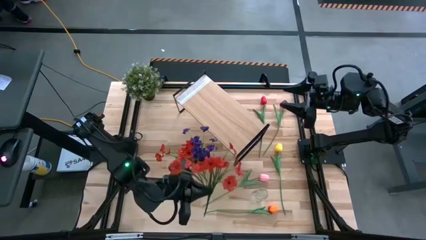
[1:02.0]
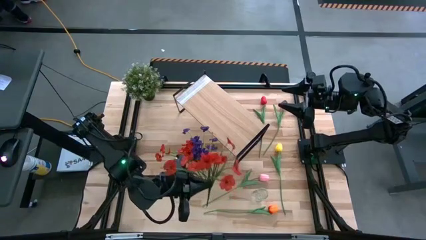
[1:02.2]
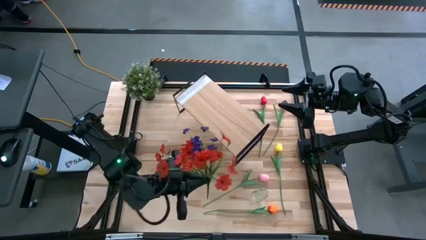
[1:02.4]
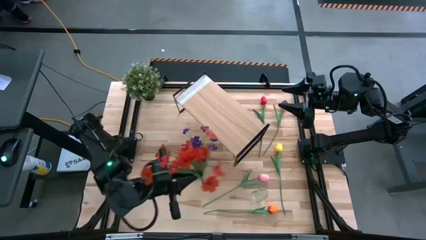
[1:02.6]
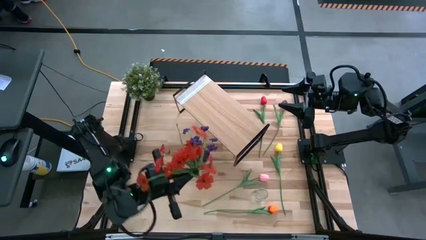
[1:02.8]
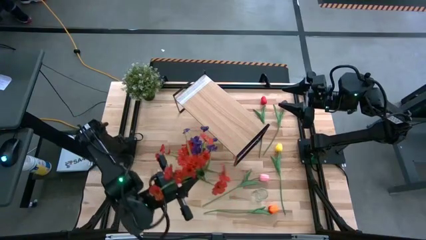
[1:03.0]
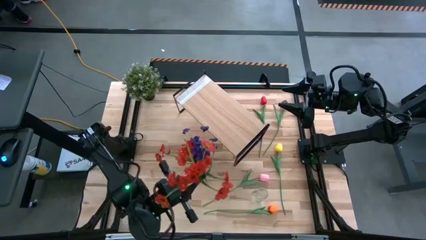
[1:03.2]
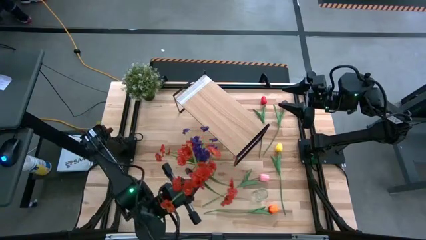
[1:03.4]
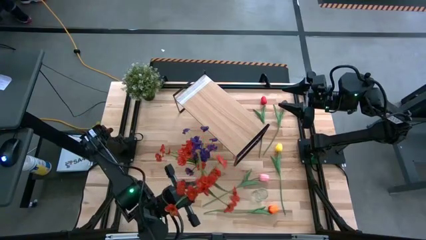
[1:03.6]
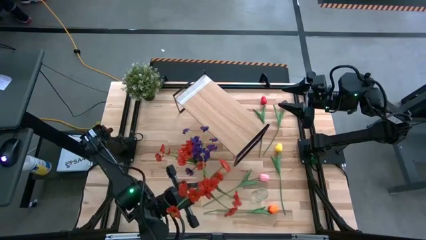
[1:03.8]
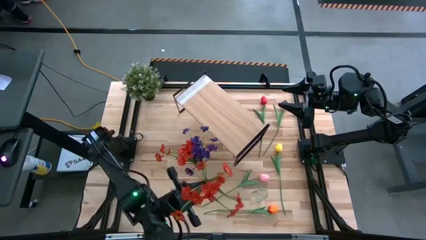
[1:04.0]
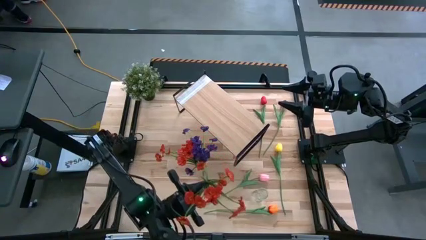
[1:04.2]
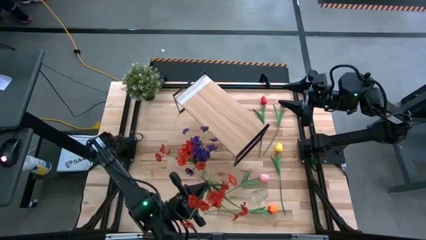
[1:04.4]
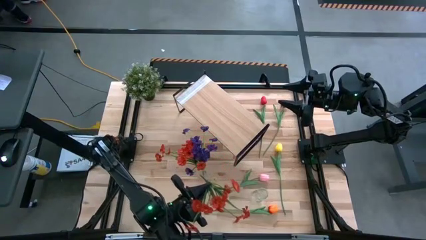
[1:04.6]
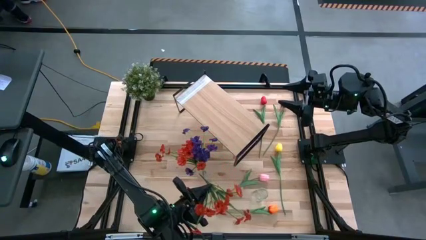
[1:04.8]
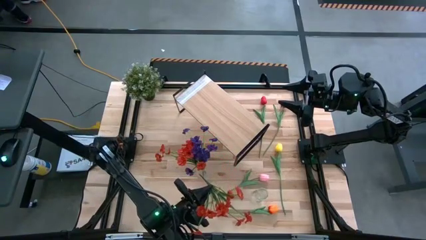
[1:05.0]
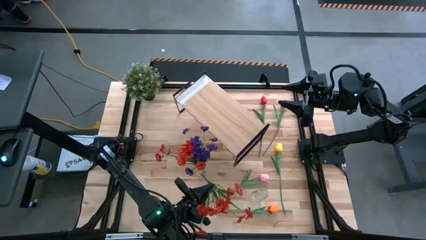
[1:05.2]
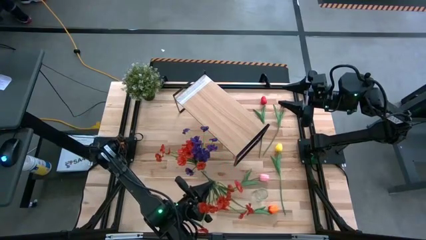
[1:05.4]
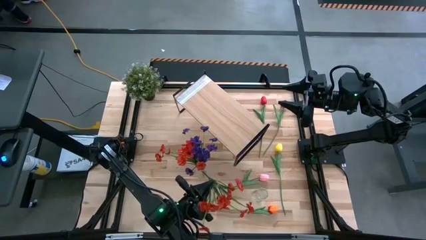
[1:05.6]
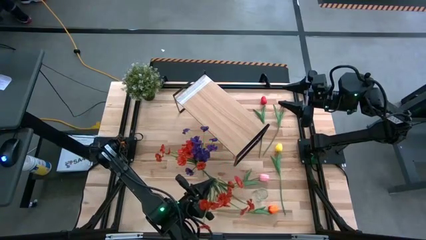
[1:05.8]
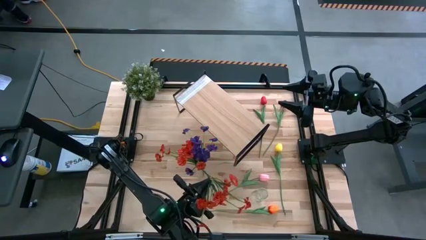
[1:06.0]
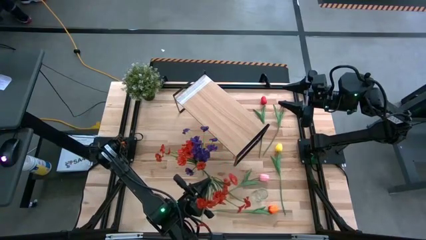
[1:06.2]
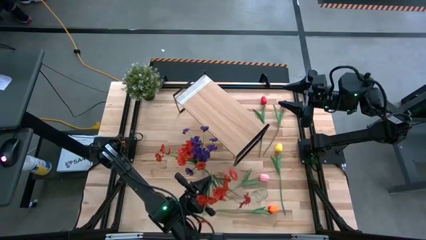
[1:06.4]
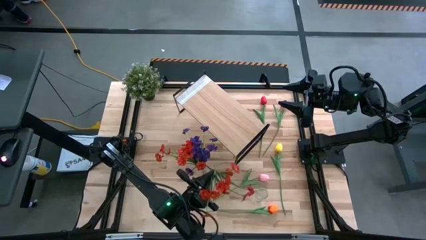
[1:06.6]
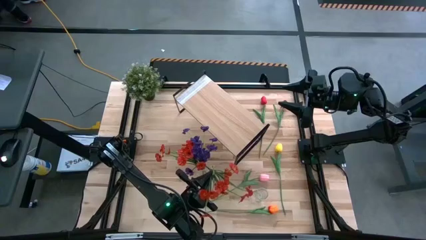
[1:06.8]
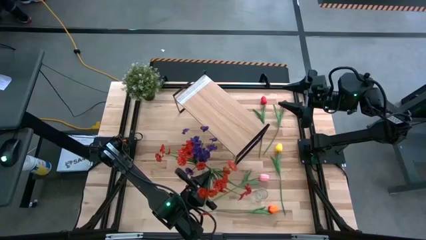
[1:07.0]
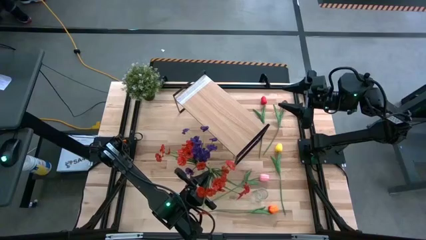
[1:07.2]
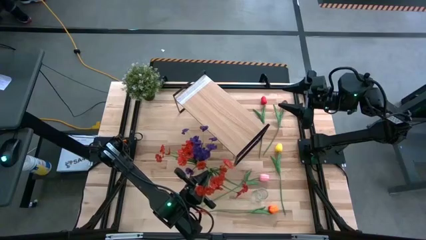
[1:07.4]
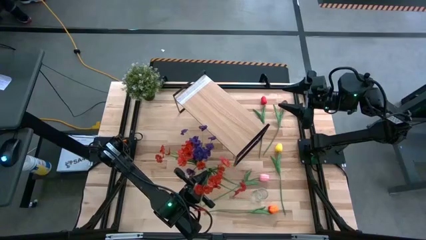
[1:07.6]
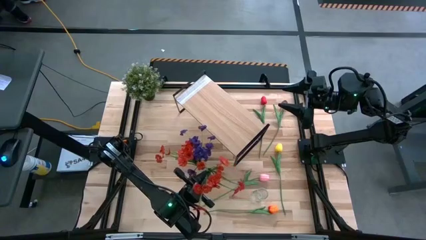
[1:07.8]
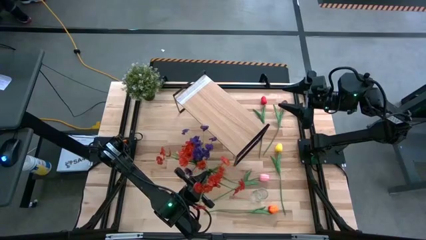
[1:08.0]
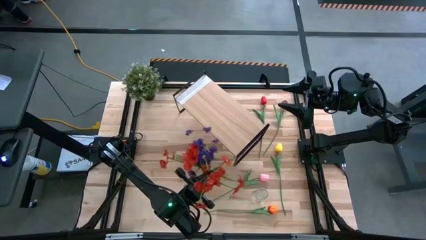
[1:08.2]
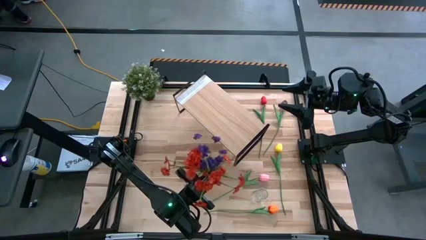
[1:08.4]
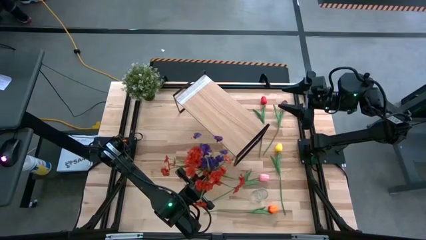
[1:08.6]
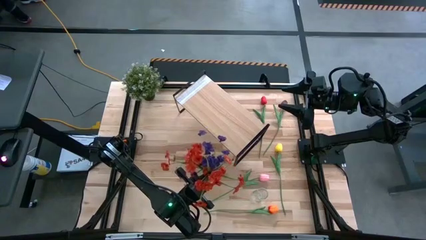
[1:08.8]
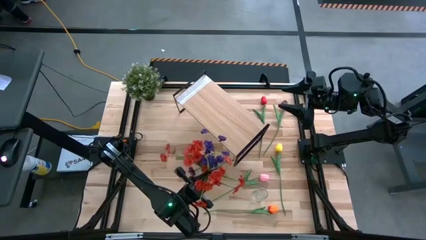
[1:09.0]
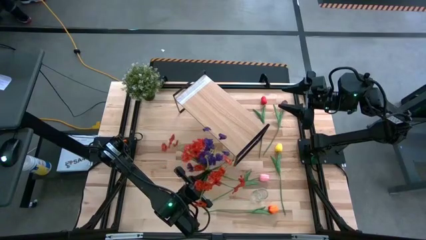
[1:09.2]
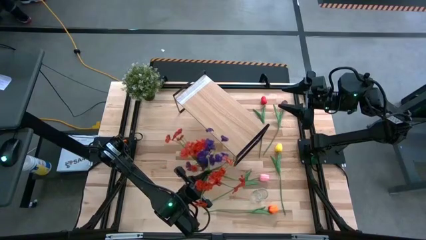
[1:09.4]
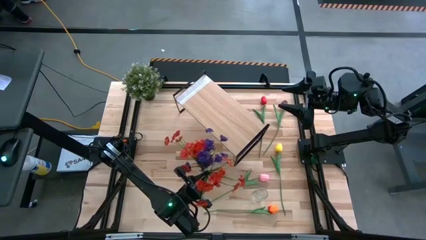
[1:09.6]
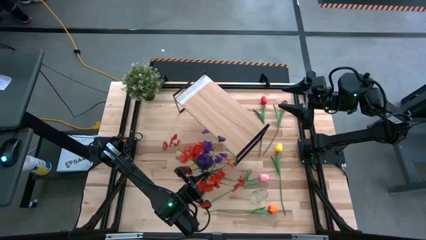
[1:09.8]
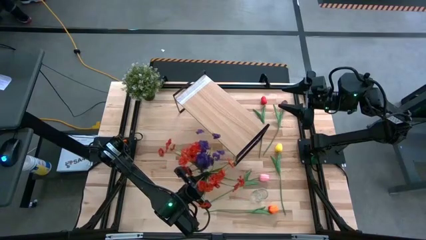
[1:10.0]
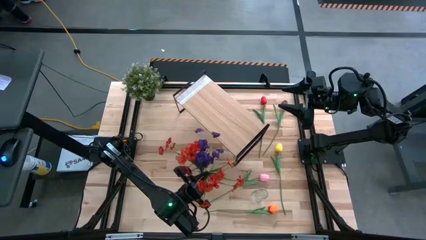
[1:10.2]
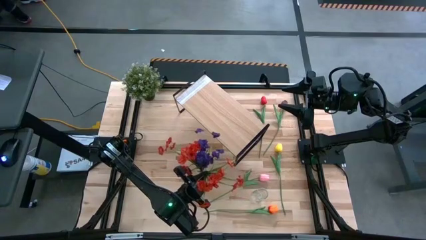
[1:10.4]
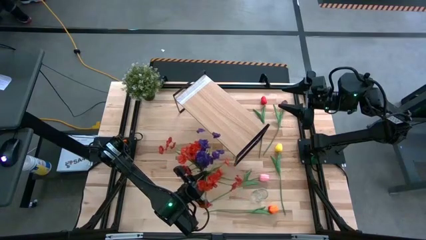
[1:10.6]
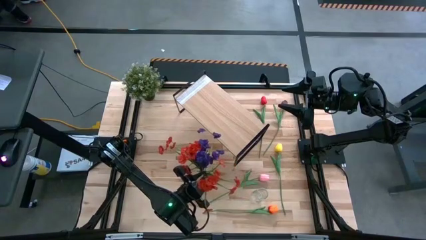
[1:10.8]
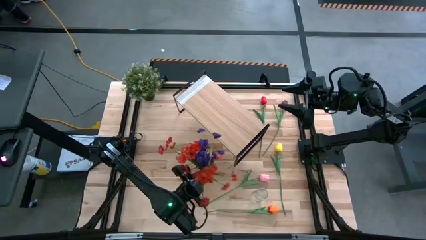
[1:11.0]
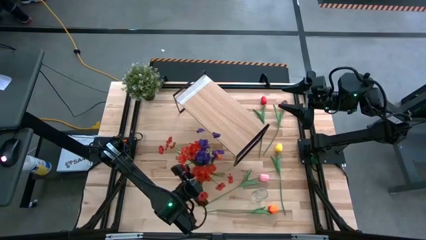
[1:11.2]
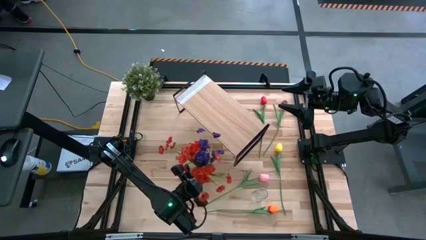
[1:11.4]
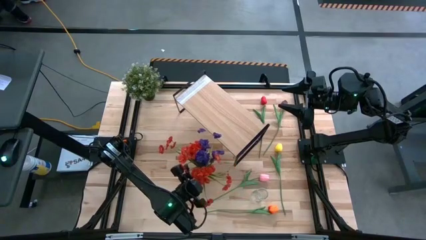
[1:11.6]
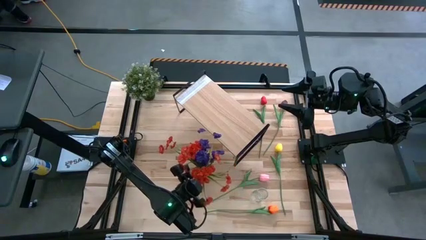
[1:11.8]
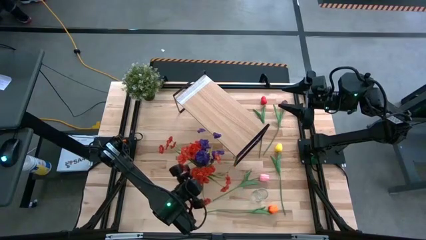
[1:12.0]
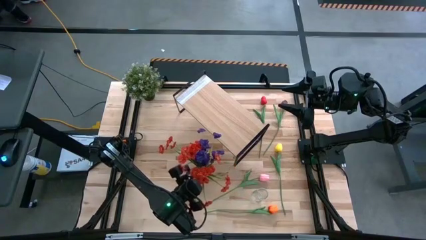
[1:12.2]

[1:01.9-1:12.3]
Task: Pick and place flowers into a vace then onto a shelf
Put the orange flower into the left transparent vase
